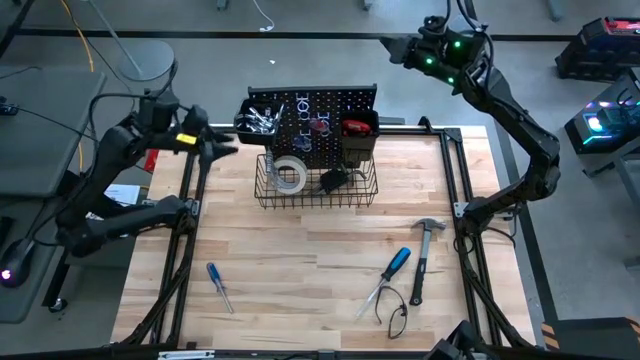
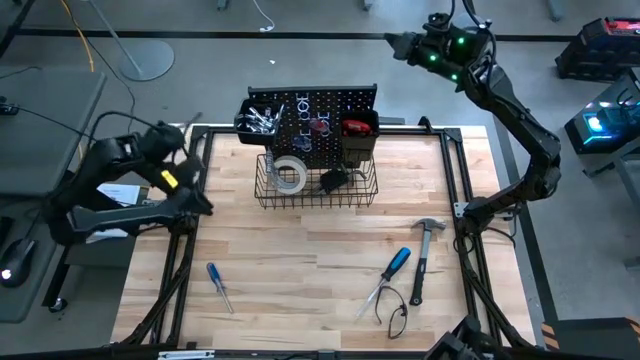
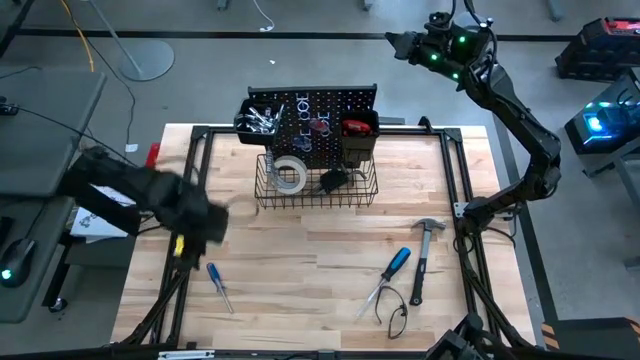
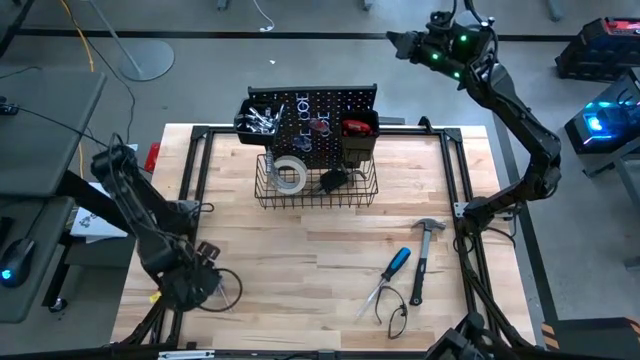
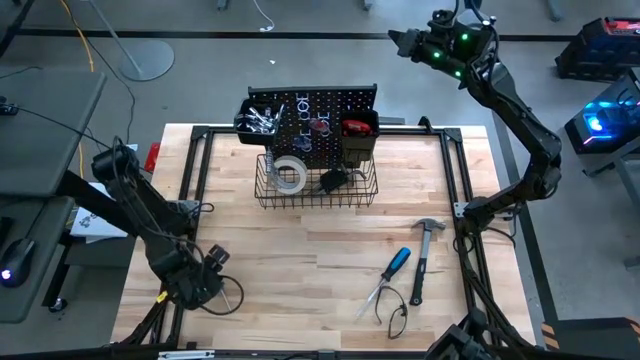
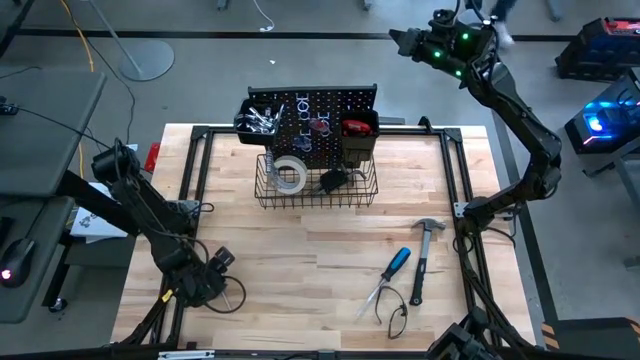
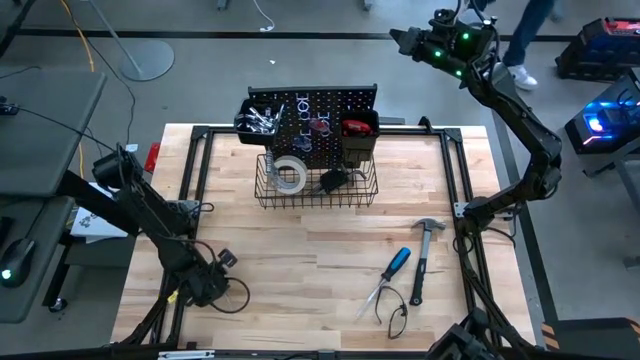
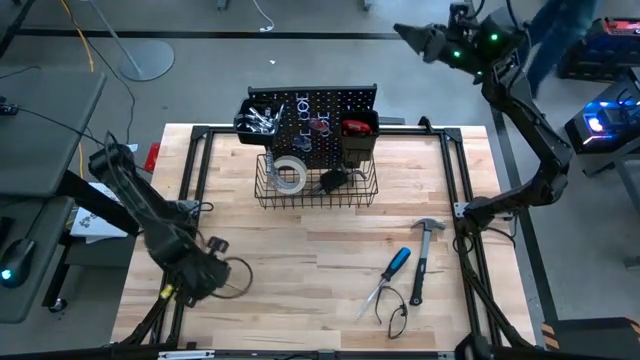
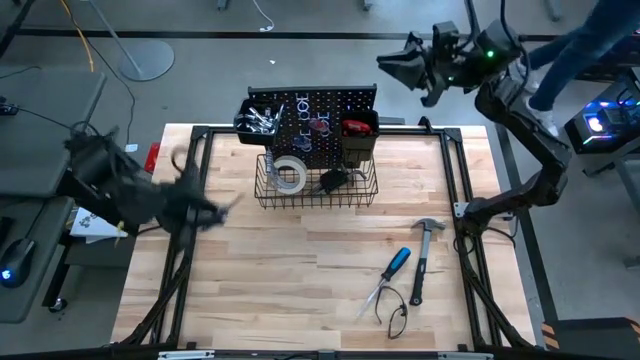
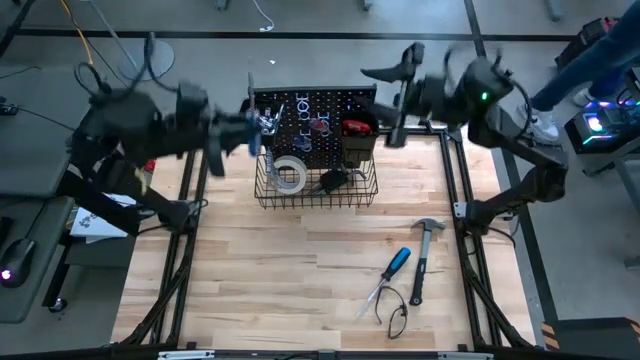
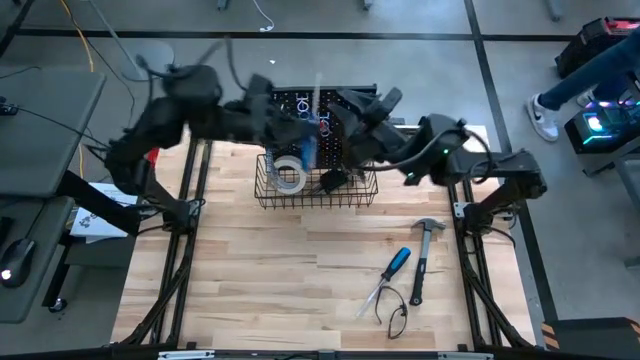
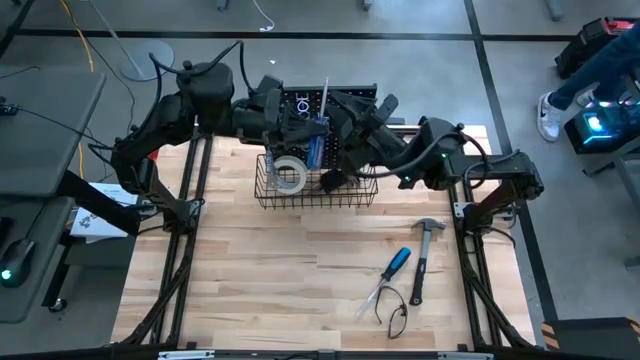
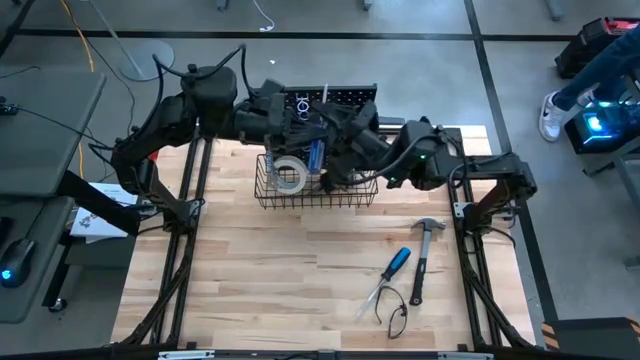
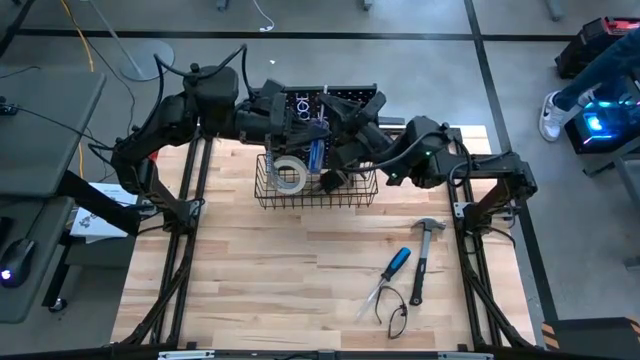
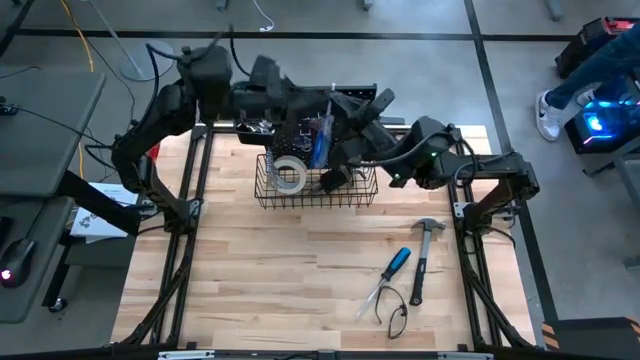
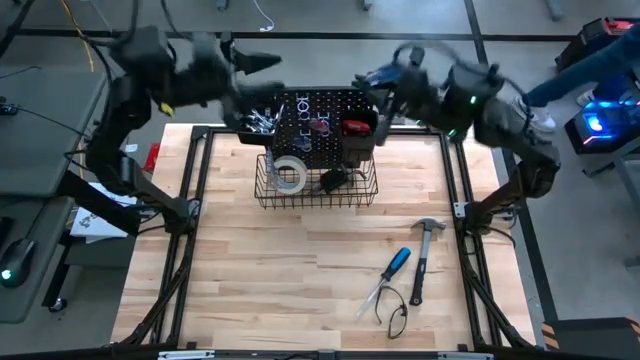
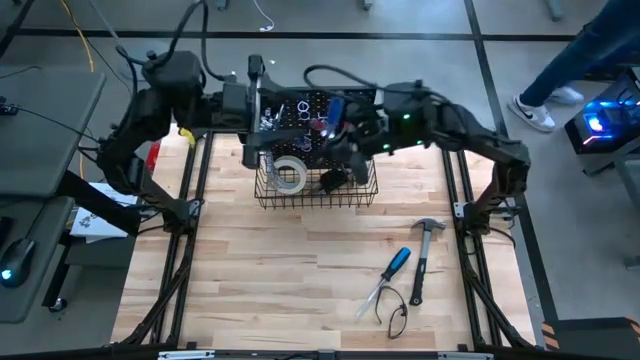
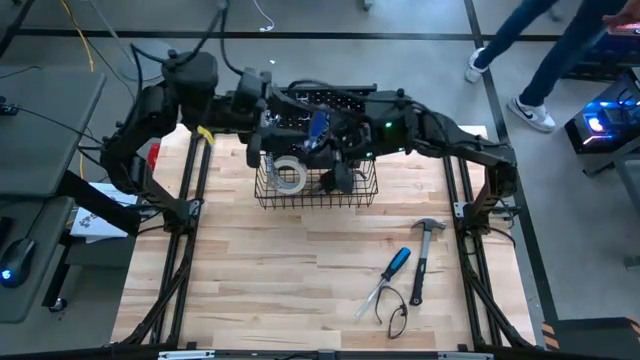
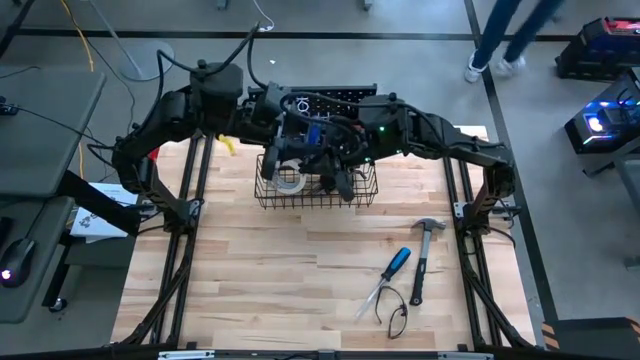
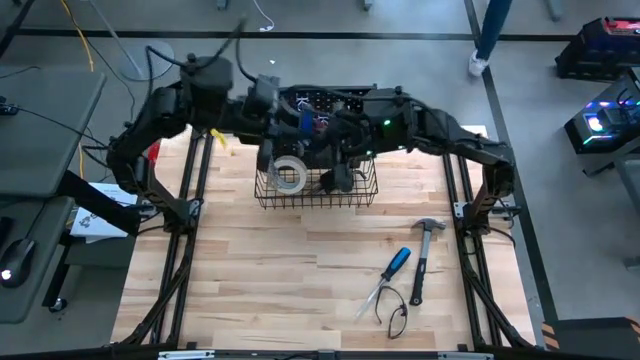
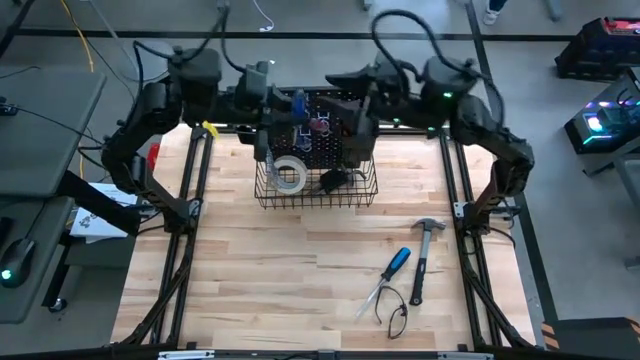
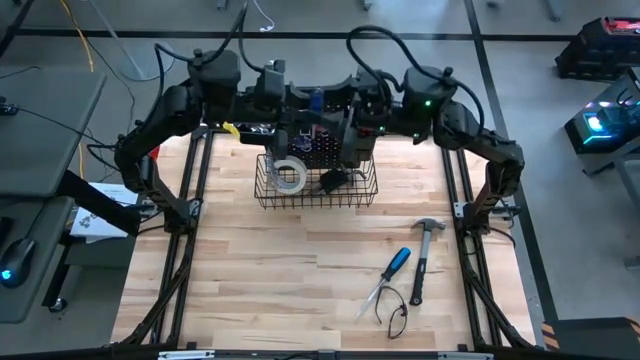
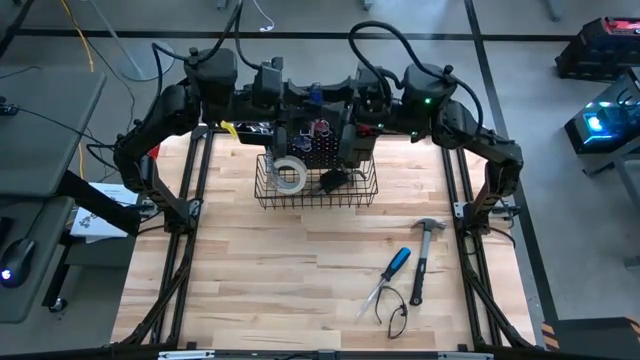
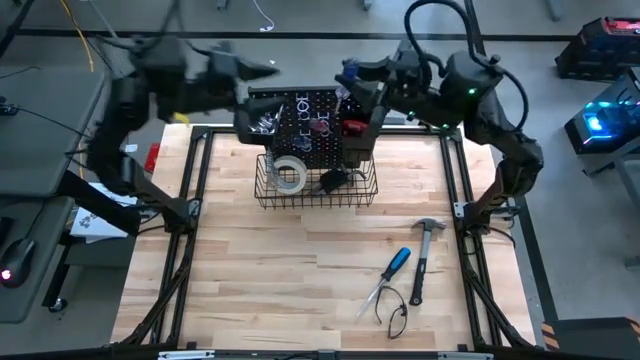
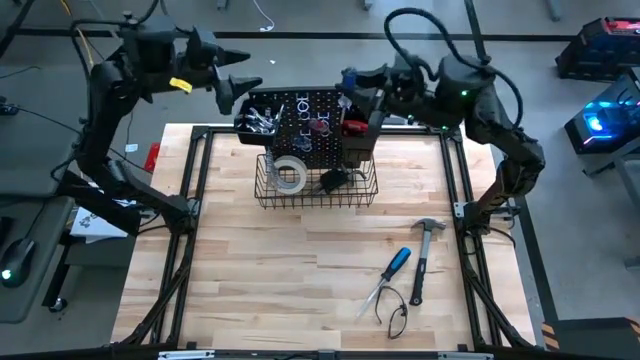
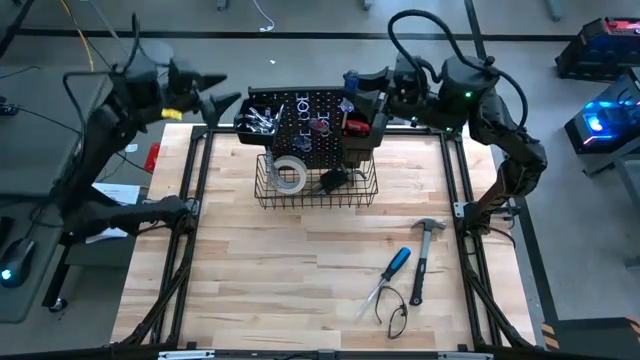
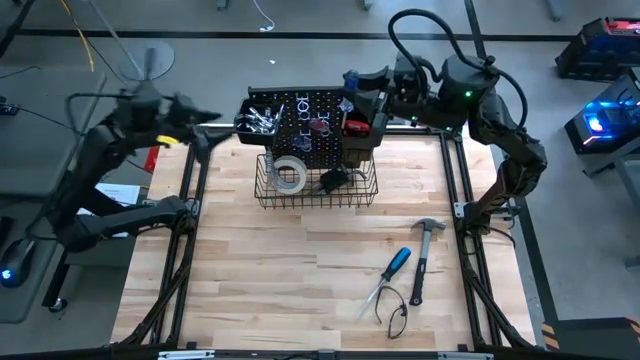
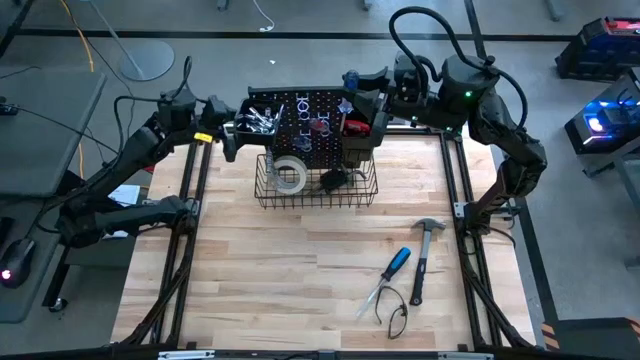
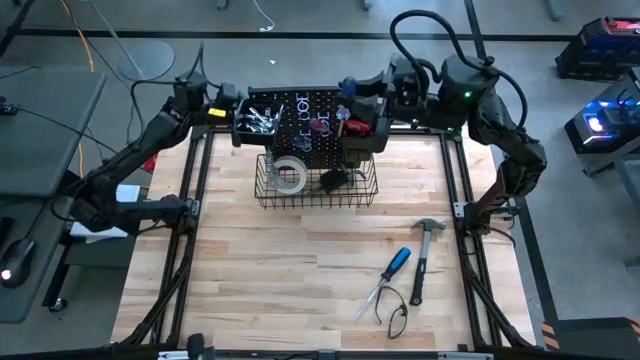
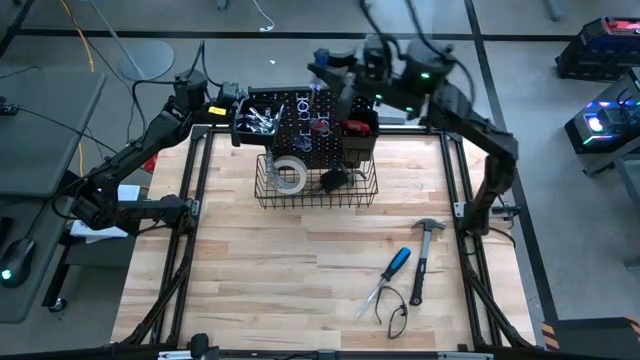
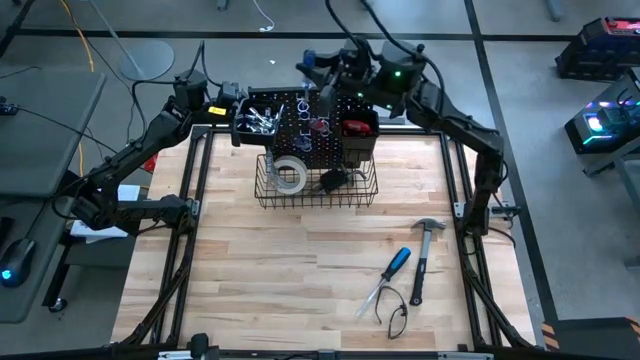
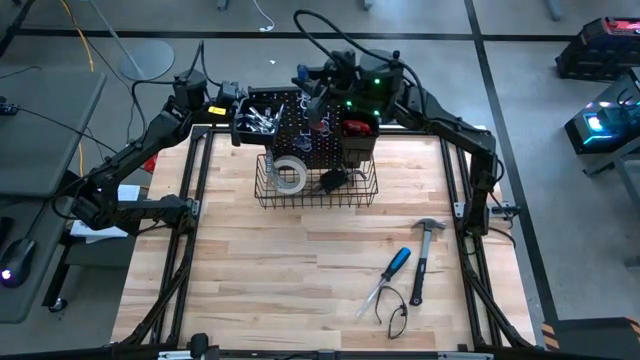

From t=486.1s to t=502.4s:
Task: Hang tools onto peg board
Hang the blue transparent screwdriver on the peg board

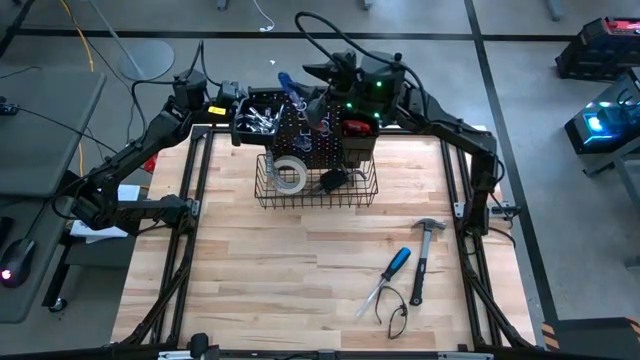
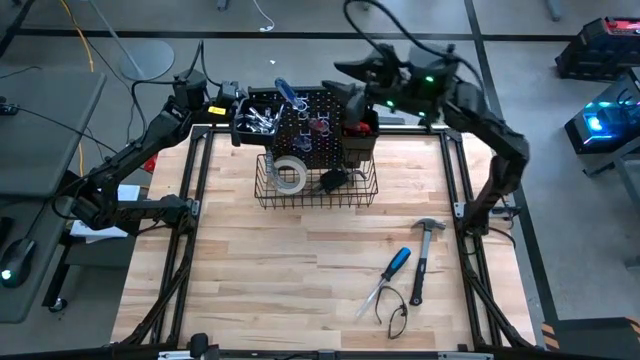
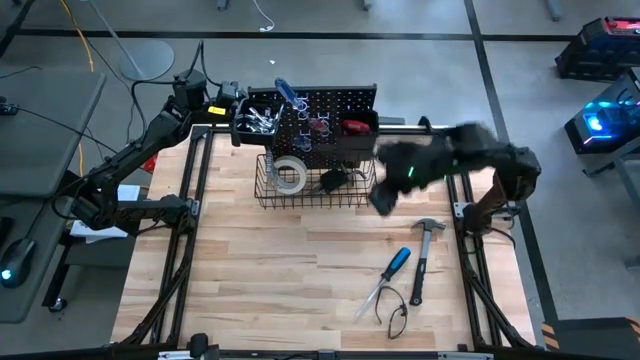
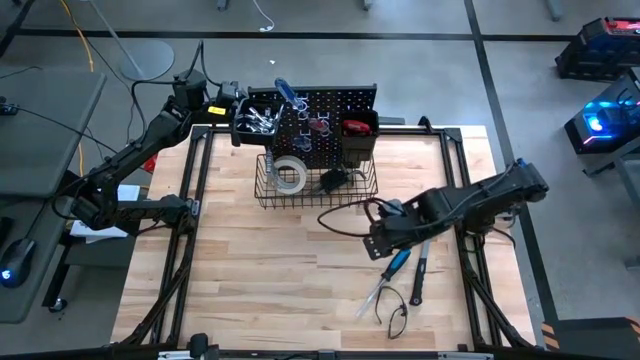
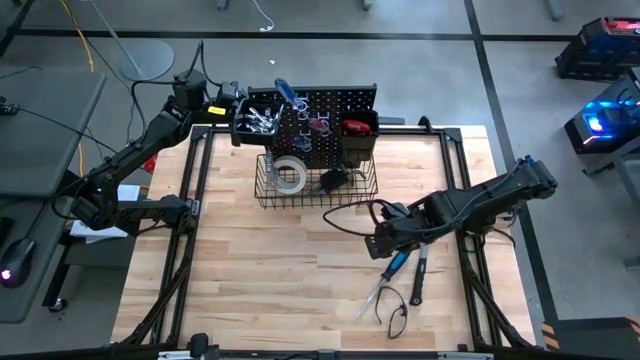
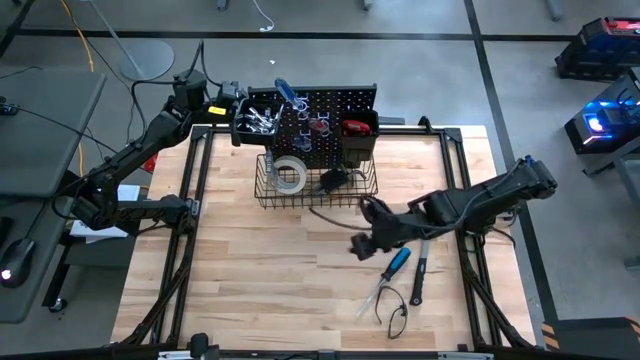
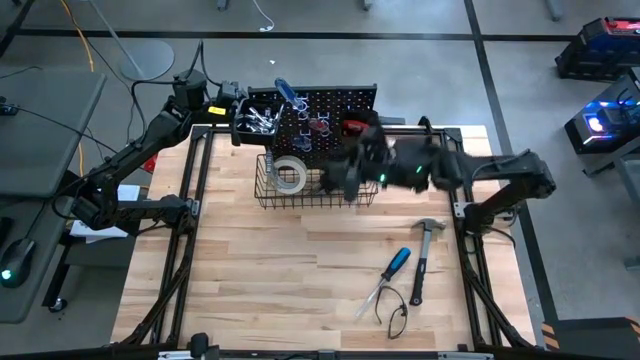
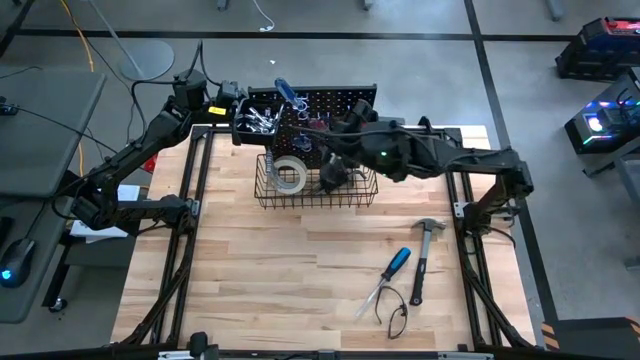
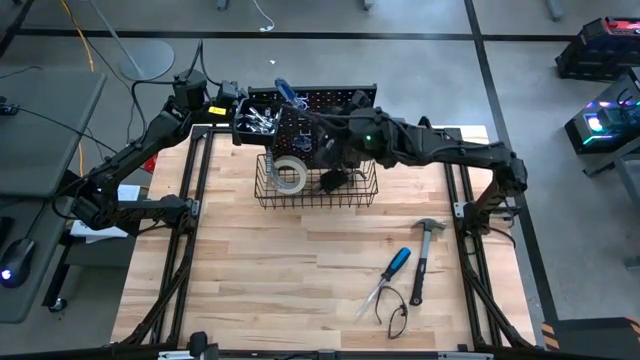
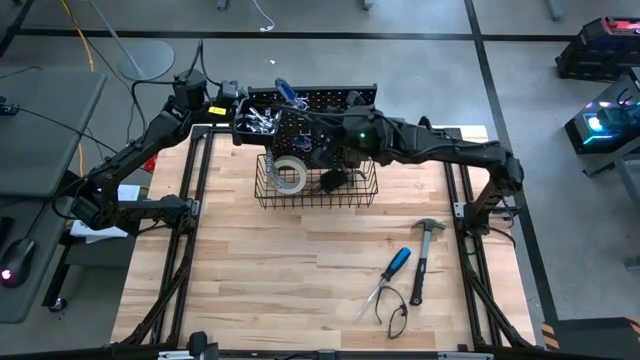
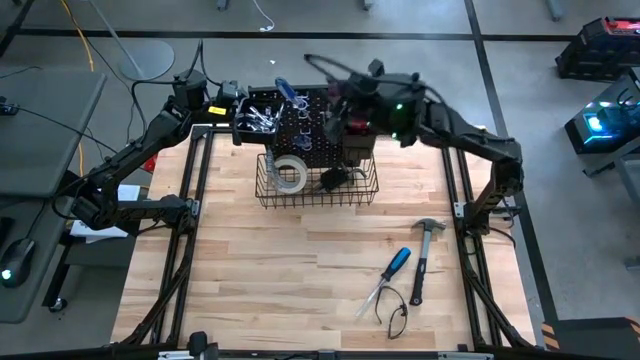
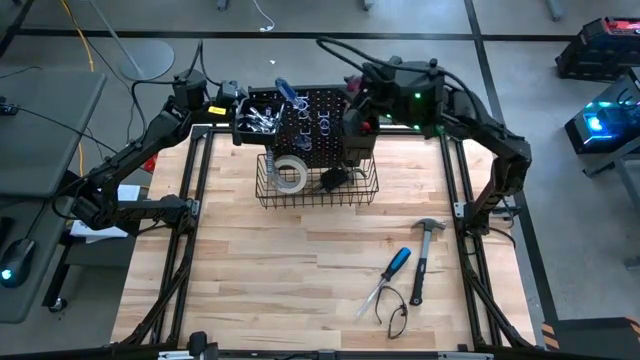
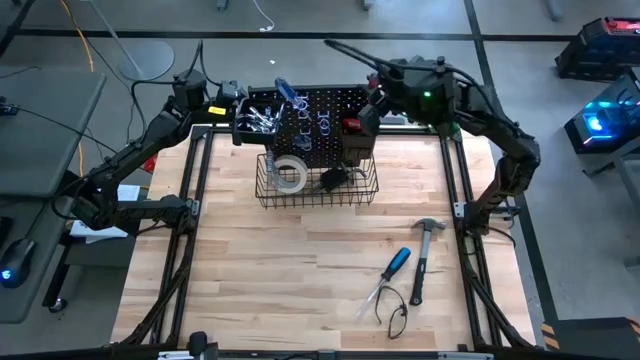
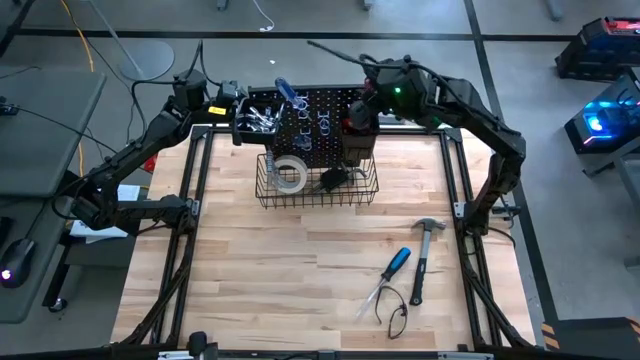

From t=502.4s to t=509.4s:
Put the red transparent screwdriver in the right black bin on the pegboard
